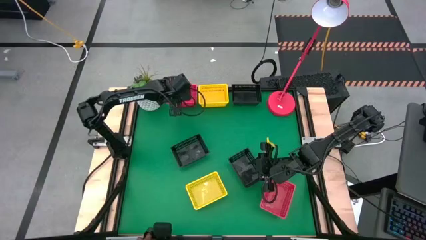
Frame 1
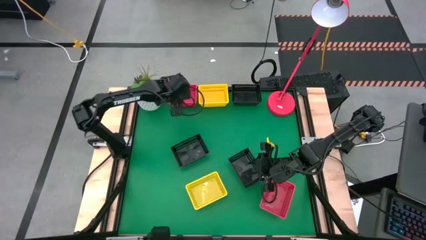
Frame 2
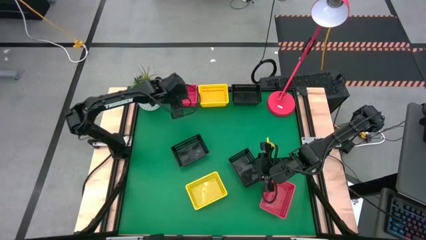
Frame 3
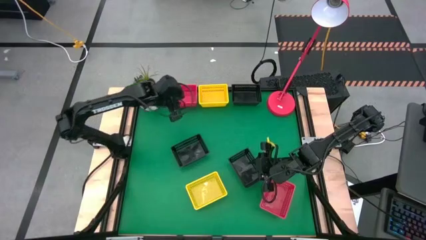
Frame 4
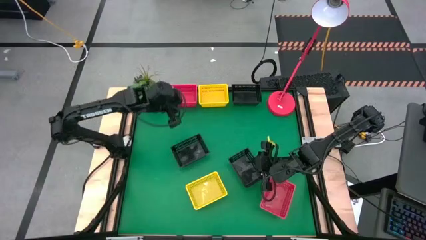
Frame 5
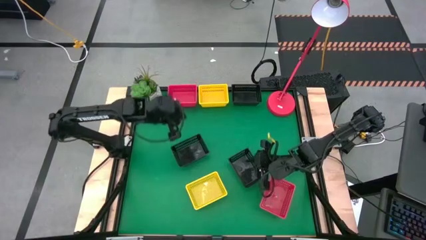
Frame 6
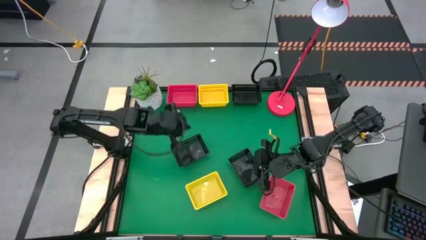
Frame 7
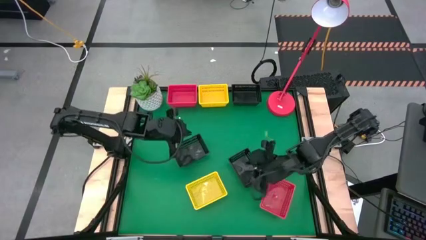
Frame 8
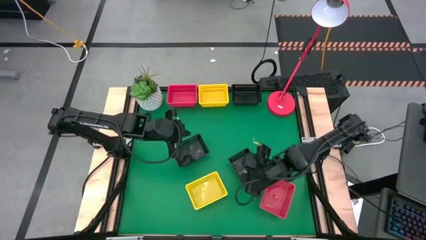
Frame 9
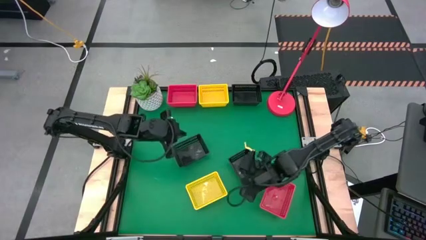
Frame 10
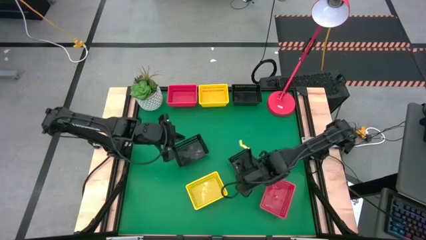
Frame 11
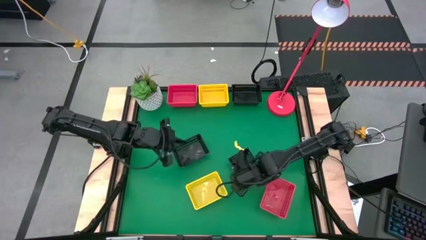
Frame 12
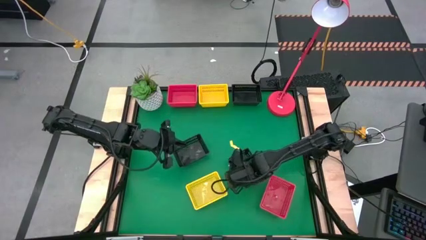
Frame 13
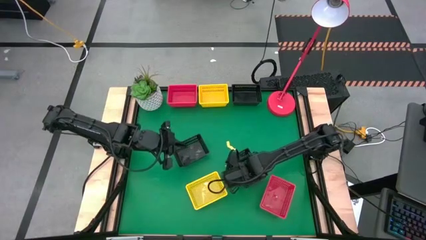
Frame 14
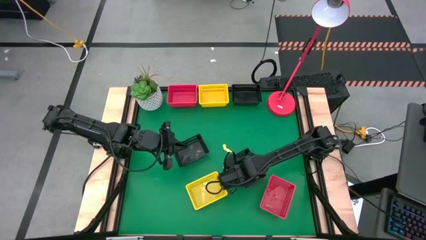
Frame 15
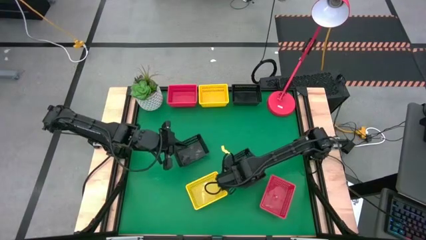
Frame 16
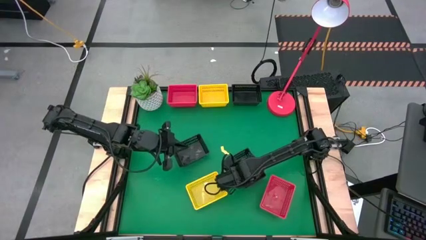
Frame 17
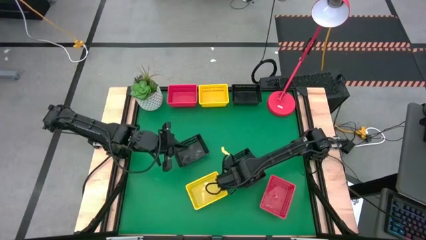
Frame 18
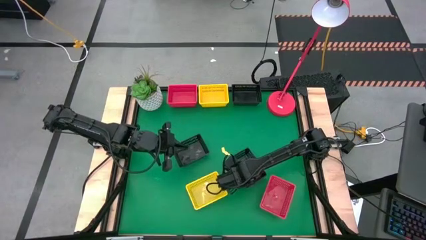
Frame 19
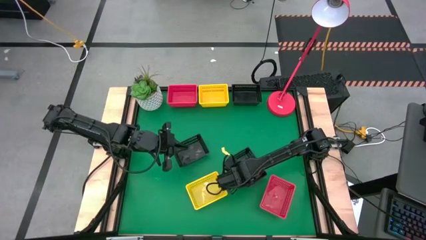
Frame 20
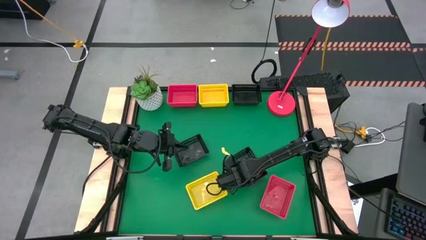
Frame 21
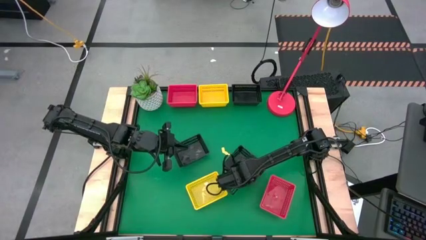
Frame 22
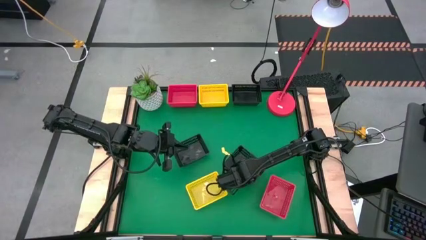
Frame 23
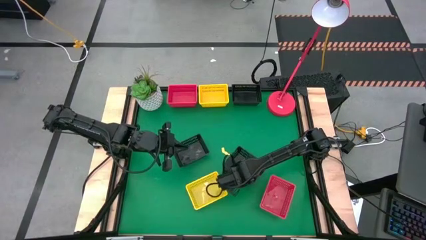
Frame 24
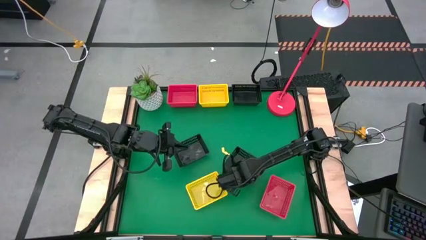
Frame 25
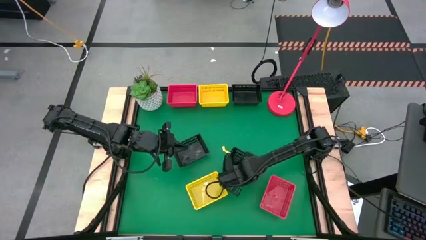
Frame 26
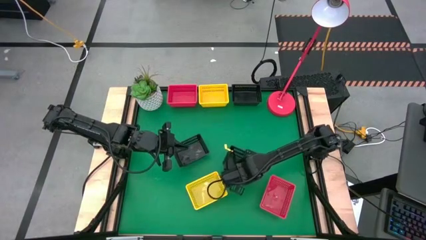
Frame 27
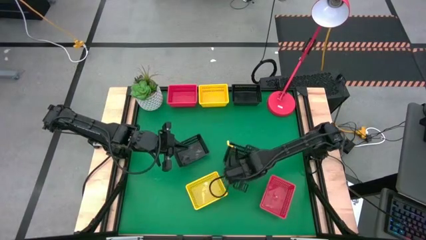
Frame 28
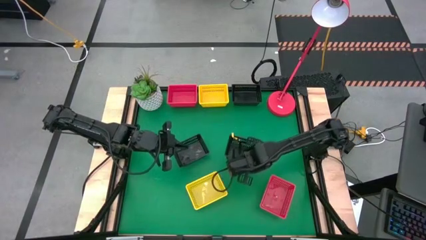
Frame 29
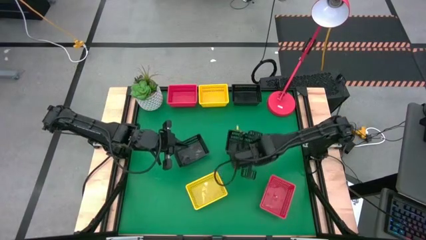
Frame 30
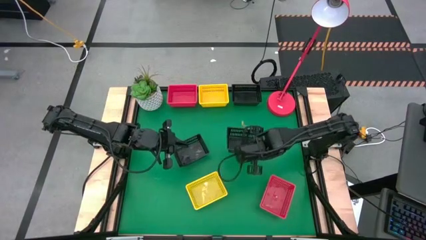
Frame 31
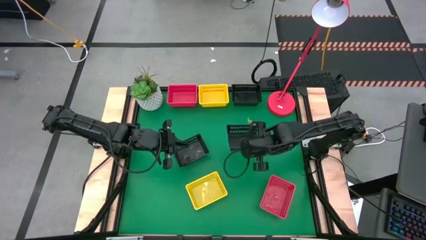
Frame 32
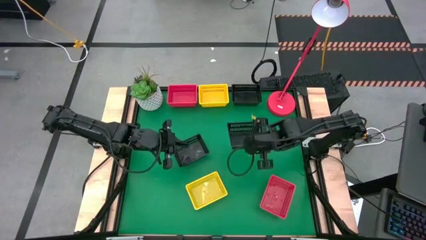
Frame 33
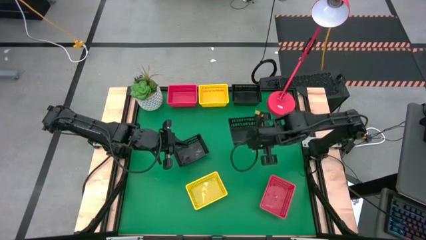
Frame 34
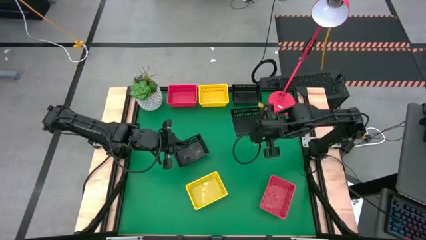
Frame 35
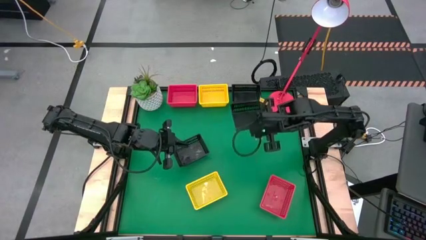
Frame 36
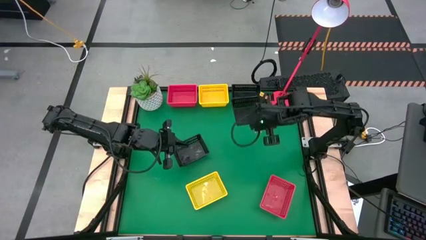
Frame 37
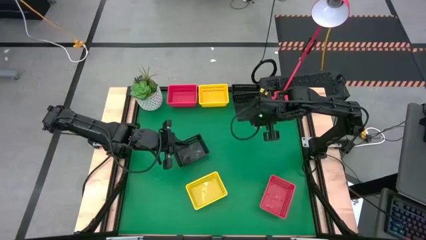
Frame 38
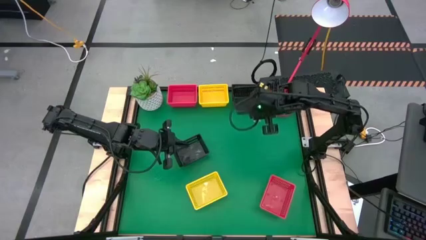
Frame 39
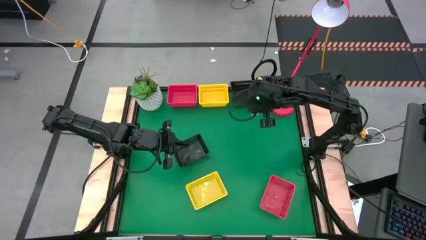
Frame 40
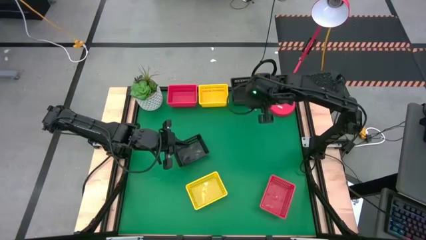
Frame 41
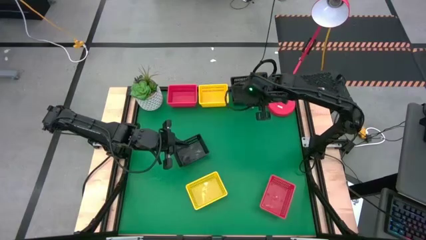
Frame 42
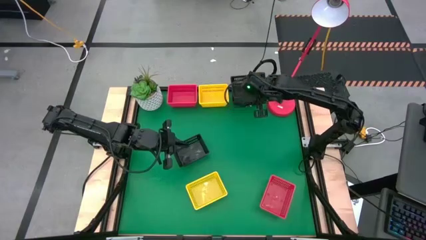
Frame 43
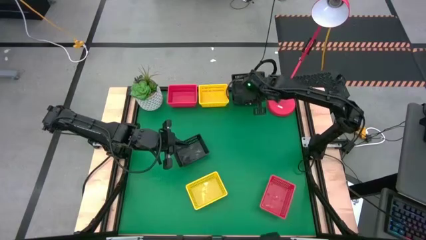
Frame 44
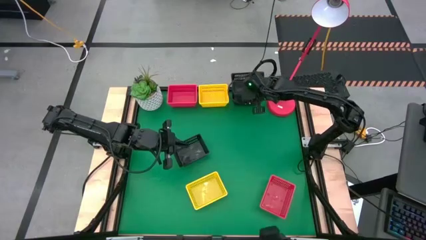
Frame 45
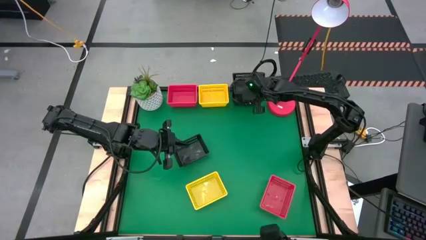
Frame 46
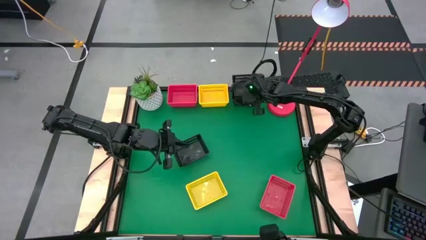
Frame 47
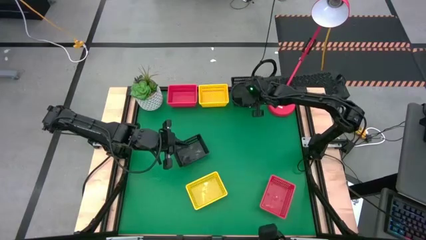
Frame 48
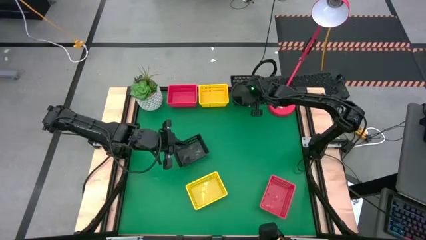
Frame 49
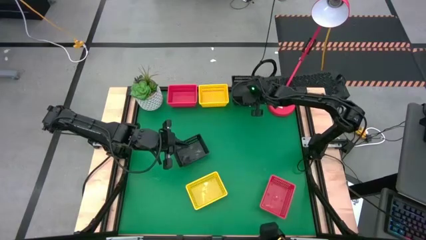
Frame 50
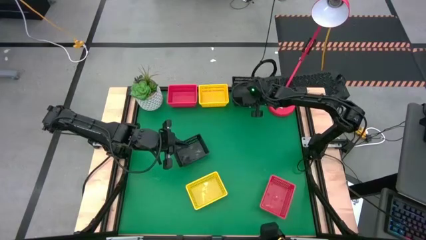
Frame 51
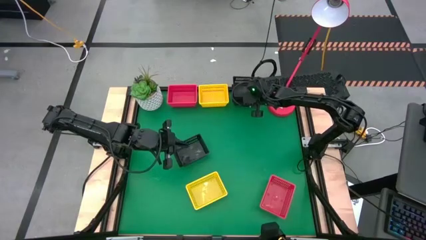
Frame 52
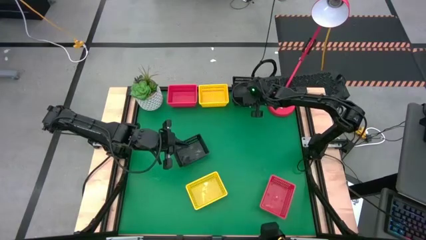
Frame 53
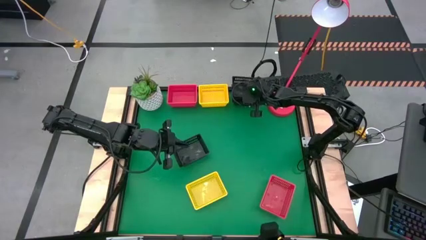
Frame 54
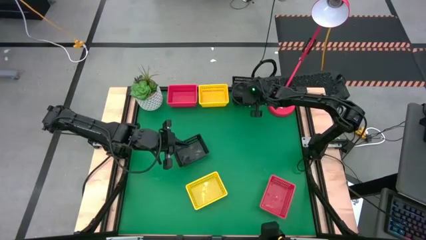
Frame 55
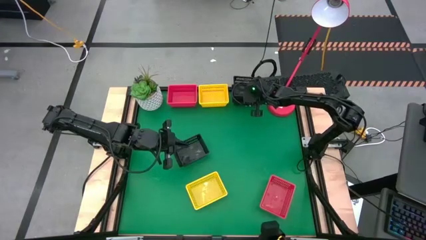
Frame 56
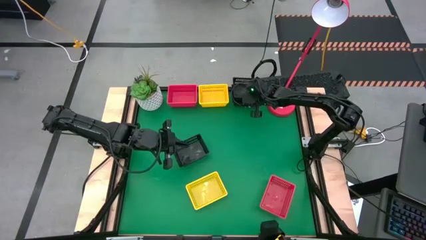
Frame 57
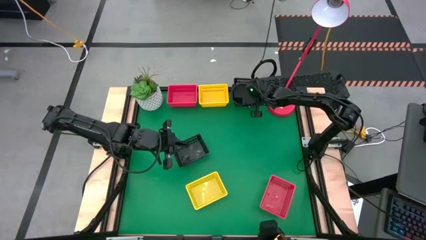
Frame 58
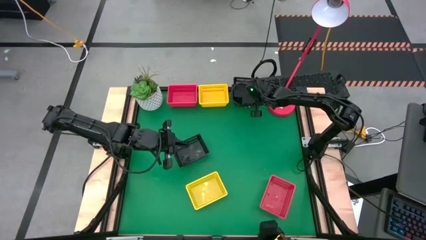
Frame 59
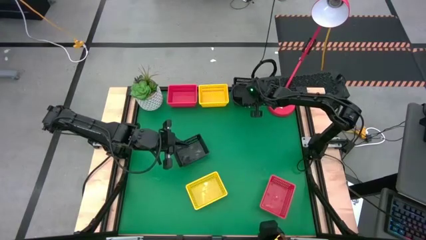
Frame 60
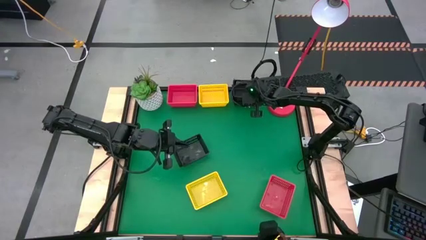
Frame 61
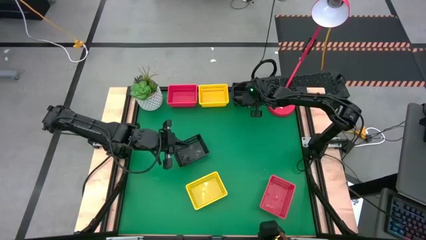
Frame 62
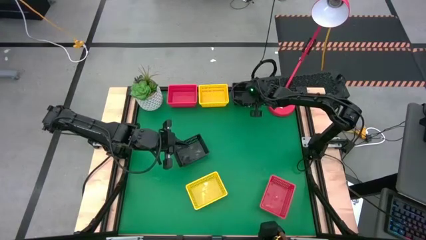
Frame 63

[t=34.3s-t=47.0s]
Stack the bottom right black basket on the top black basket
